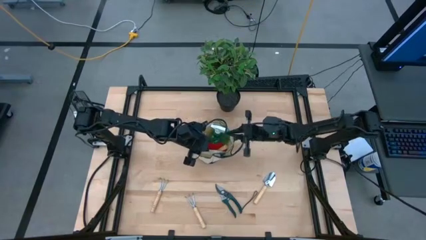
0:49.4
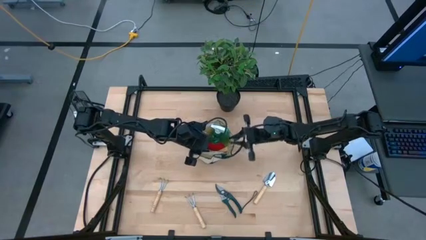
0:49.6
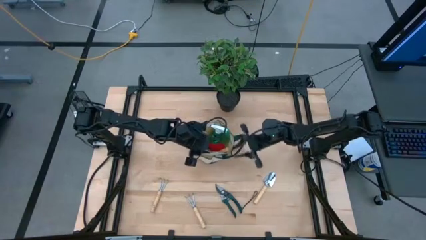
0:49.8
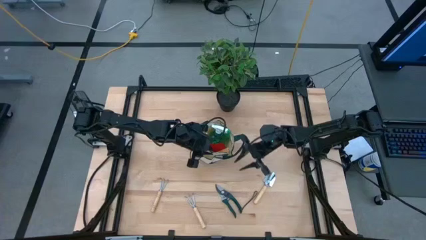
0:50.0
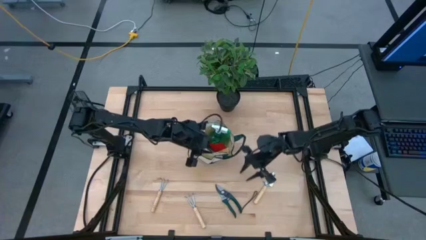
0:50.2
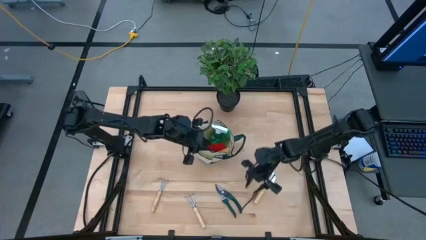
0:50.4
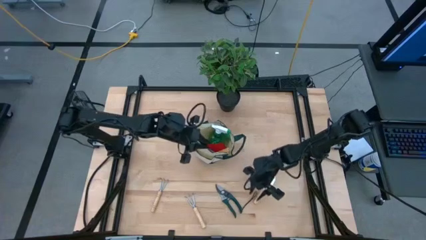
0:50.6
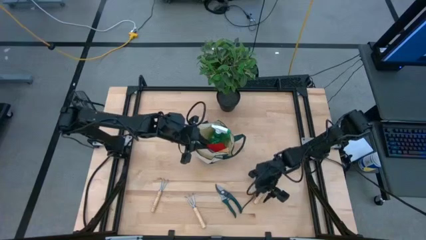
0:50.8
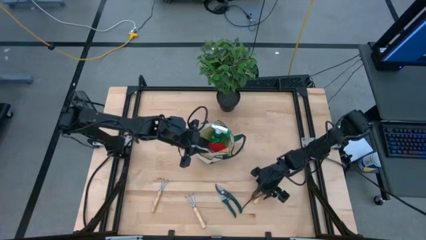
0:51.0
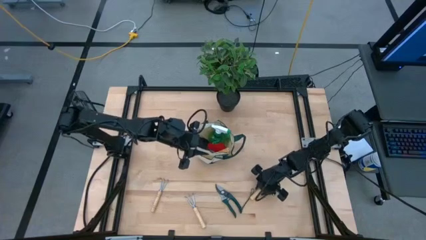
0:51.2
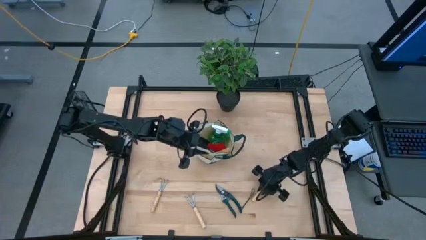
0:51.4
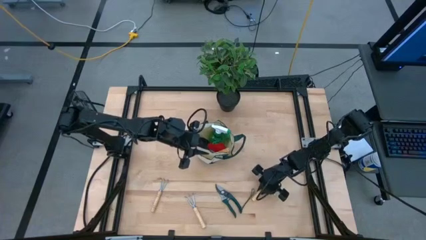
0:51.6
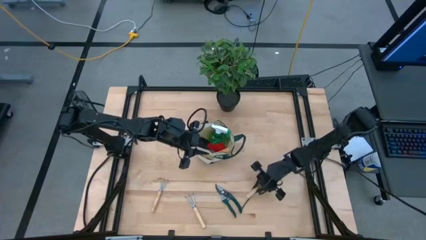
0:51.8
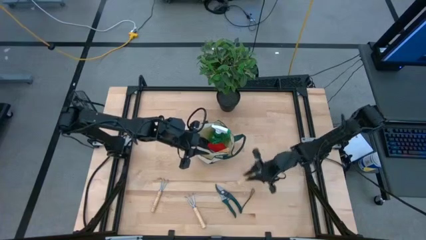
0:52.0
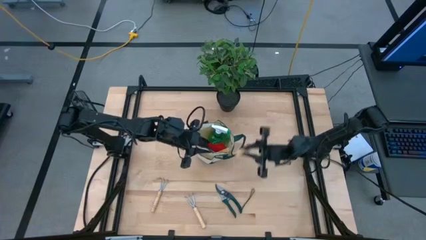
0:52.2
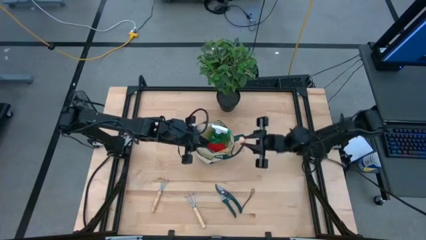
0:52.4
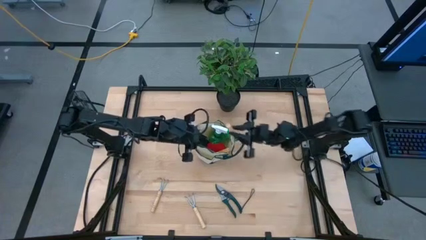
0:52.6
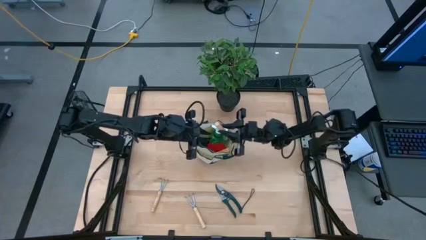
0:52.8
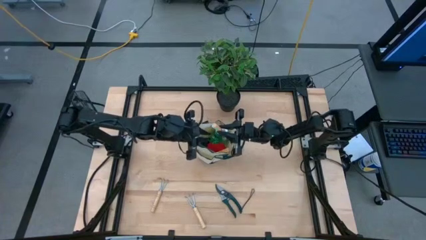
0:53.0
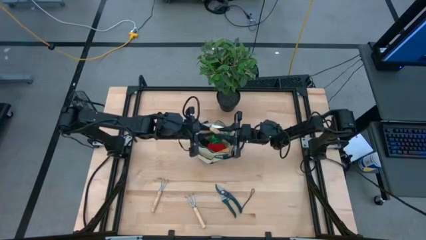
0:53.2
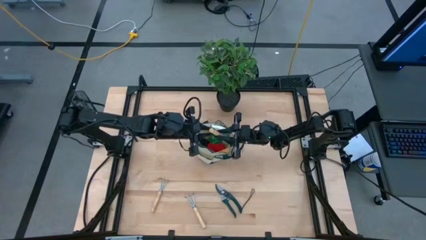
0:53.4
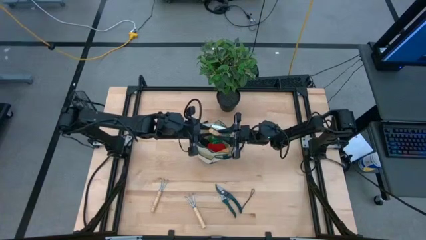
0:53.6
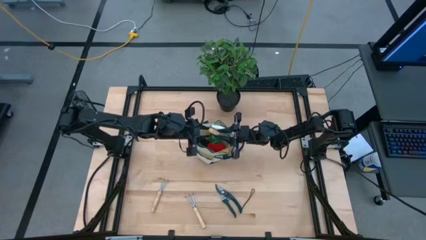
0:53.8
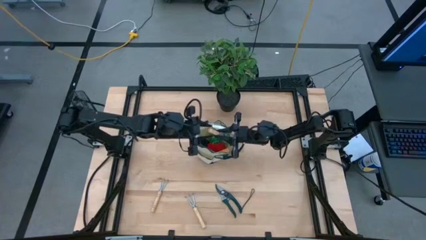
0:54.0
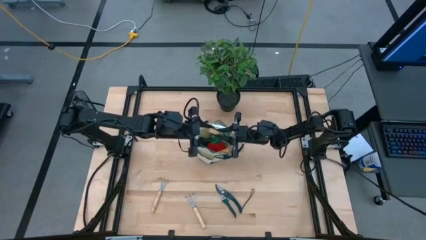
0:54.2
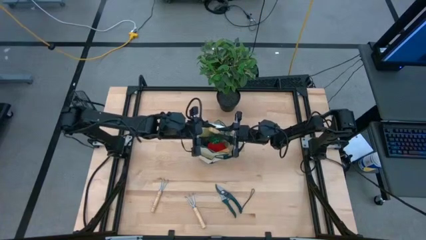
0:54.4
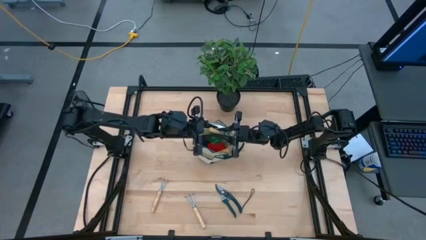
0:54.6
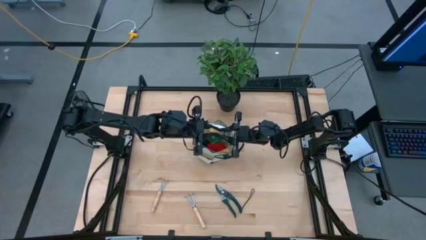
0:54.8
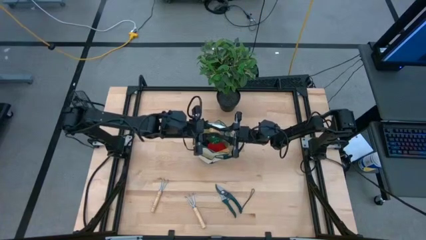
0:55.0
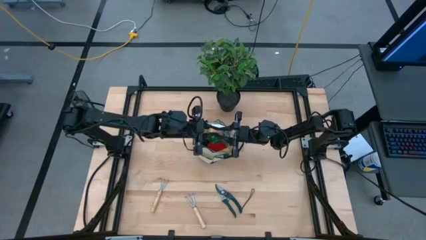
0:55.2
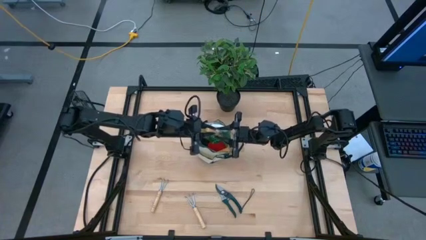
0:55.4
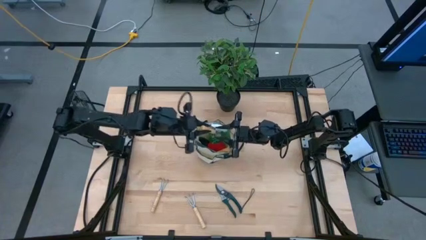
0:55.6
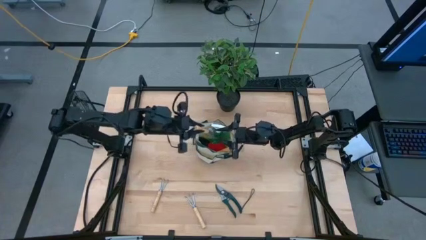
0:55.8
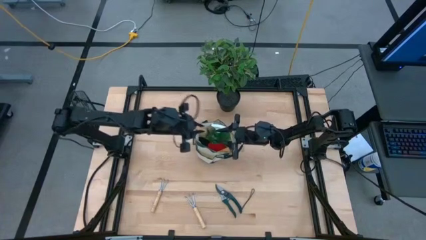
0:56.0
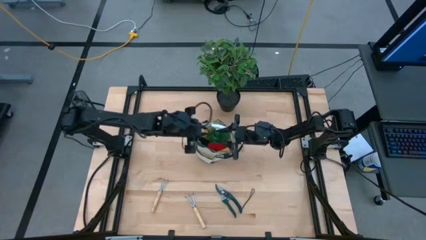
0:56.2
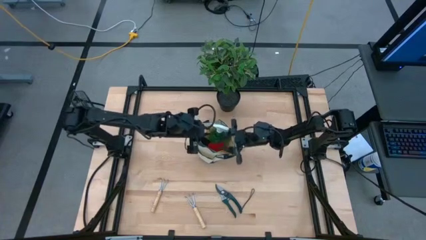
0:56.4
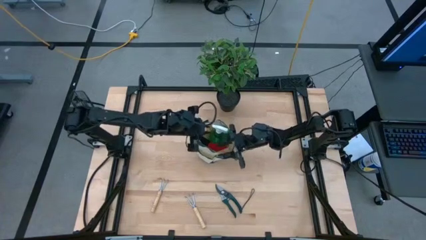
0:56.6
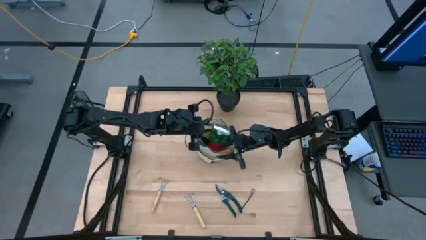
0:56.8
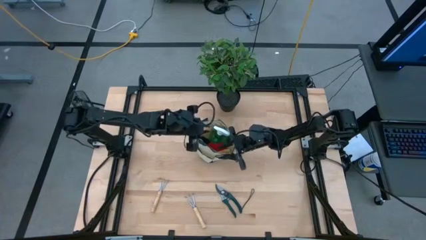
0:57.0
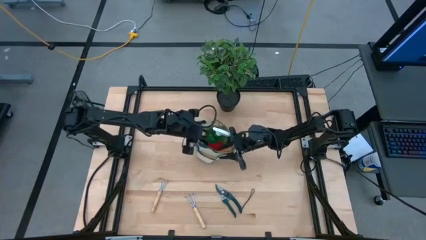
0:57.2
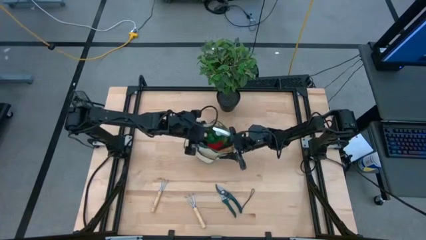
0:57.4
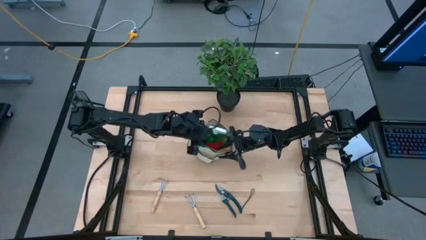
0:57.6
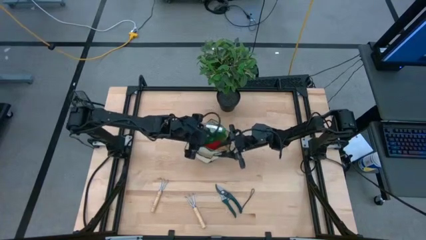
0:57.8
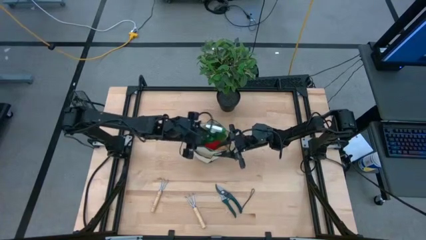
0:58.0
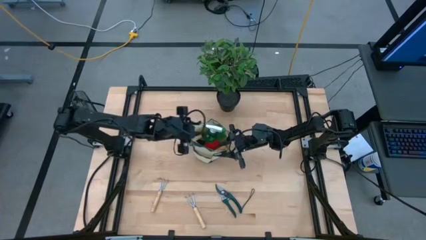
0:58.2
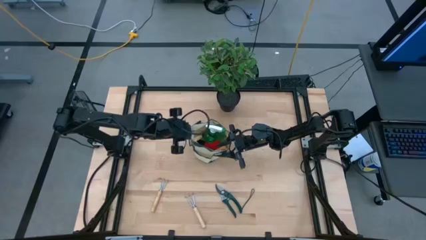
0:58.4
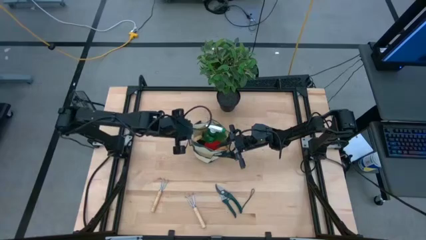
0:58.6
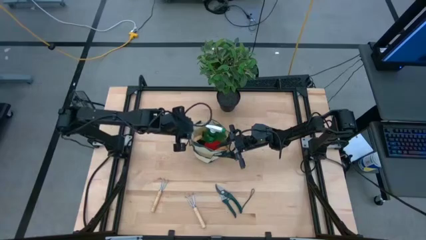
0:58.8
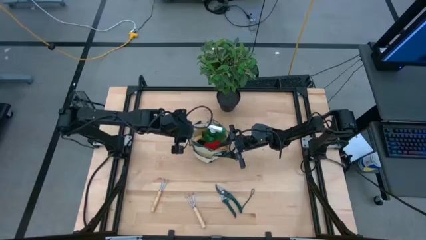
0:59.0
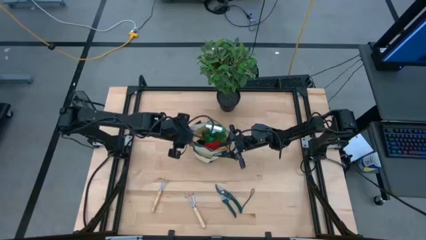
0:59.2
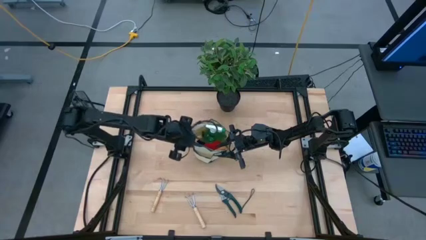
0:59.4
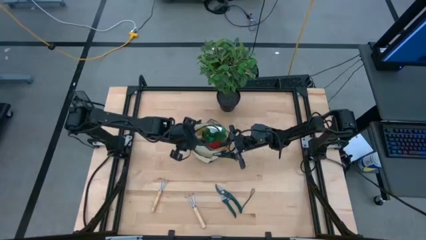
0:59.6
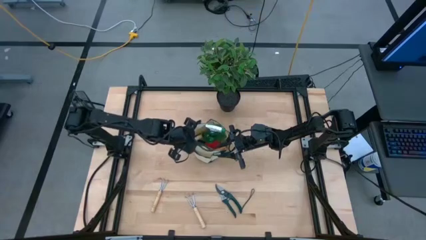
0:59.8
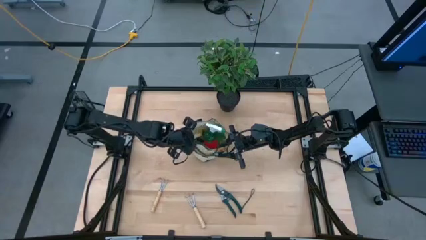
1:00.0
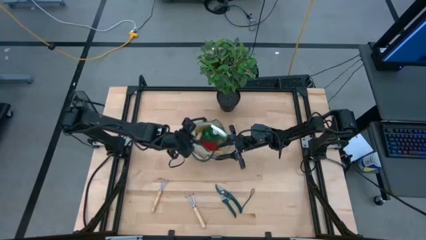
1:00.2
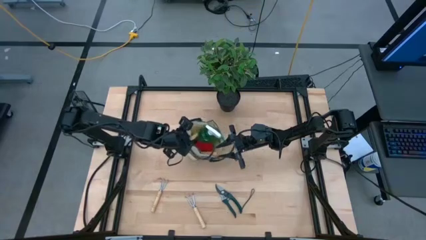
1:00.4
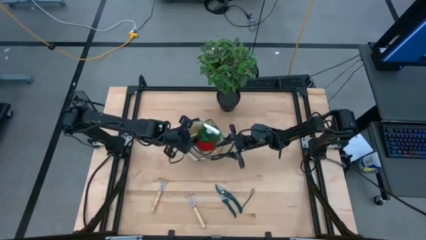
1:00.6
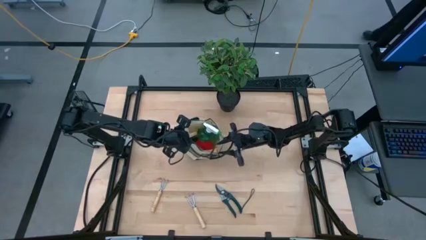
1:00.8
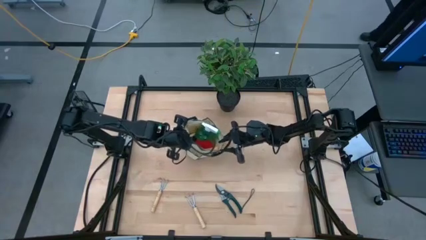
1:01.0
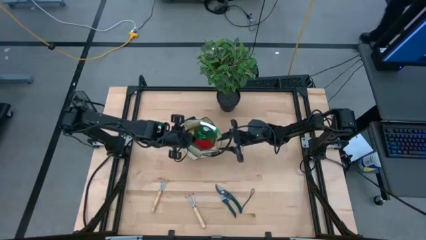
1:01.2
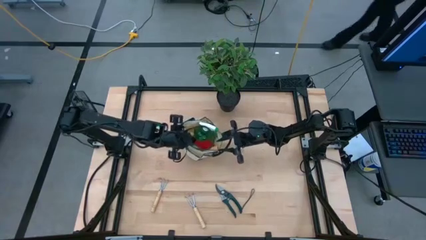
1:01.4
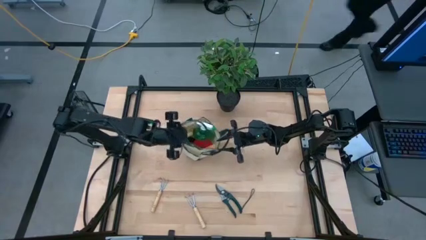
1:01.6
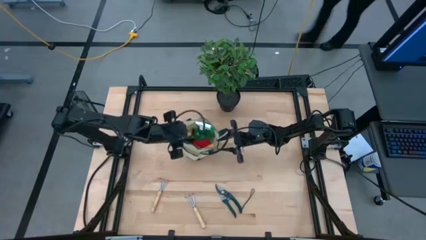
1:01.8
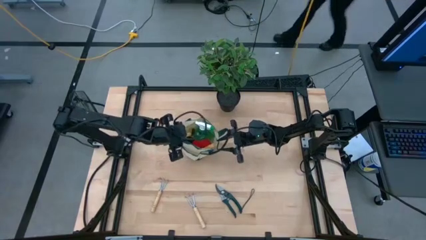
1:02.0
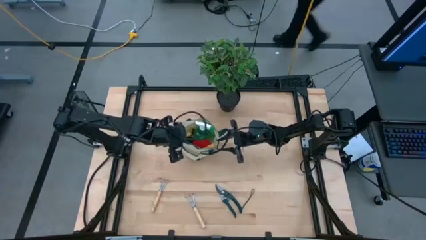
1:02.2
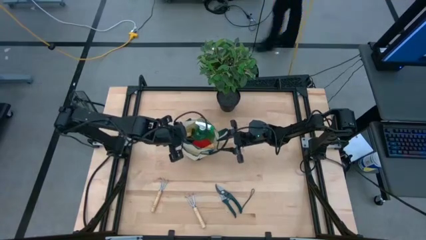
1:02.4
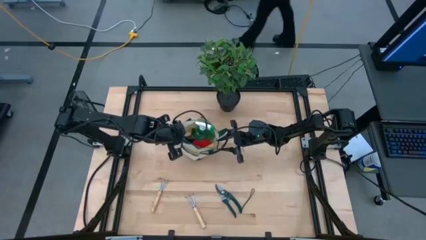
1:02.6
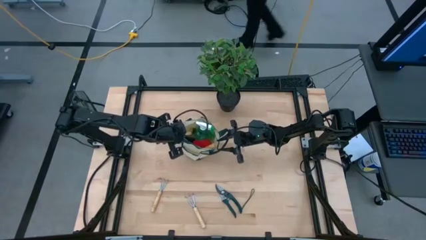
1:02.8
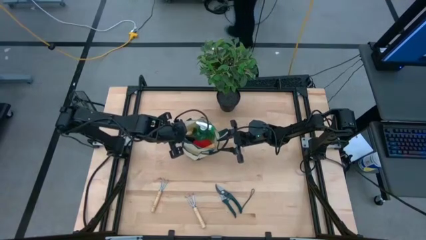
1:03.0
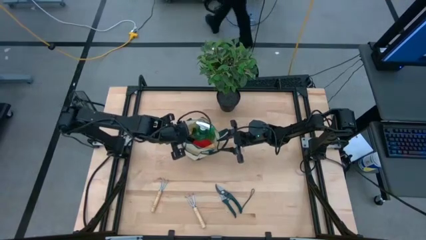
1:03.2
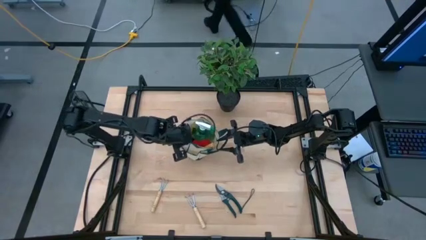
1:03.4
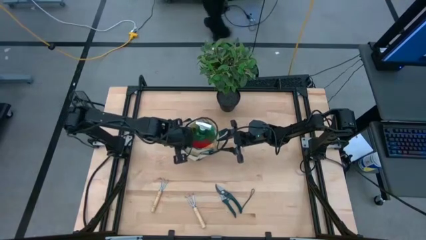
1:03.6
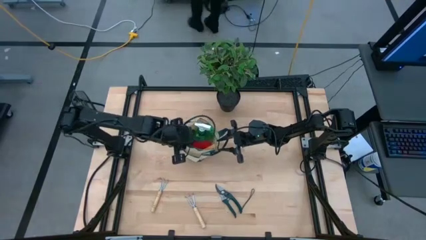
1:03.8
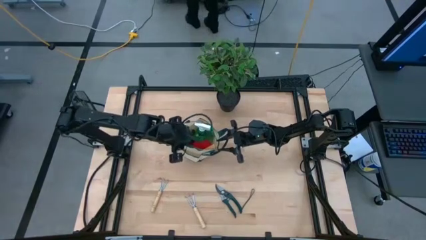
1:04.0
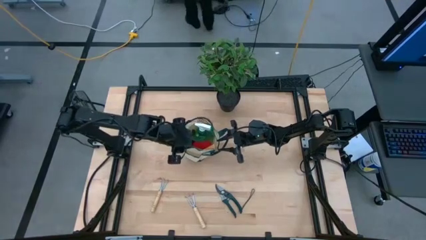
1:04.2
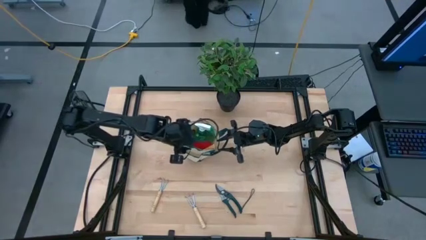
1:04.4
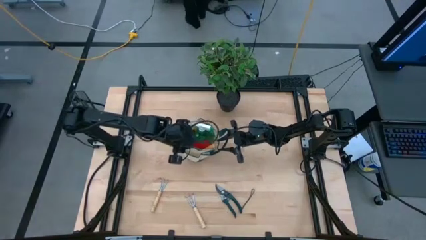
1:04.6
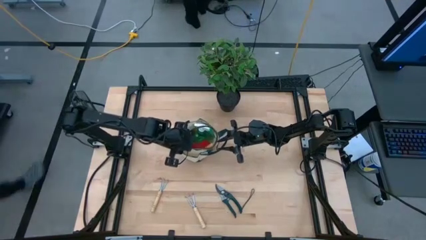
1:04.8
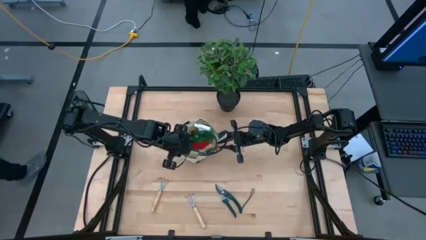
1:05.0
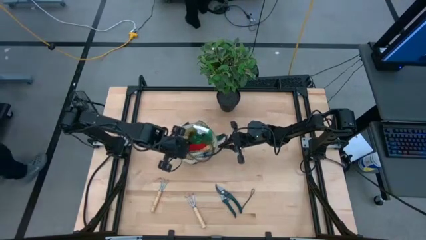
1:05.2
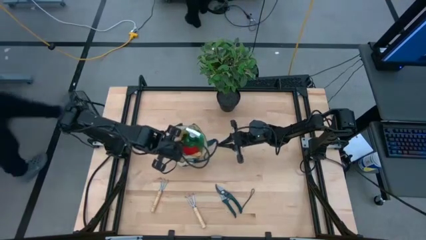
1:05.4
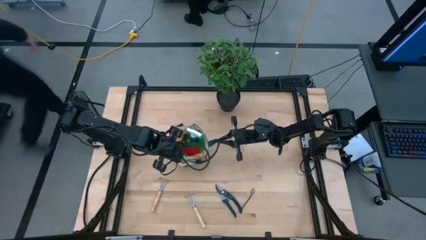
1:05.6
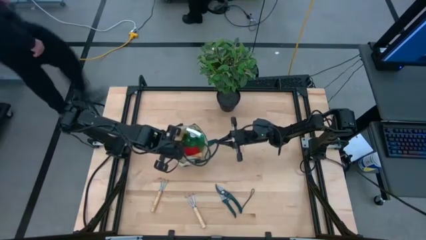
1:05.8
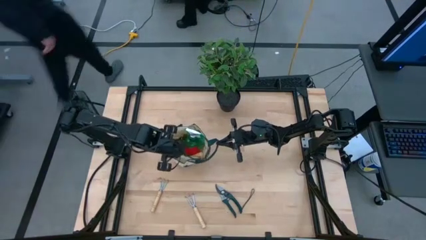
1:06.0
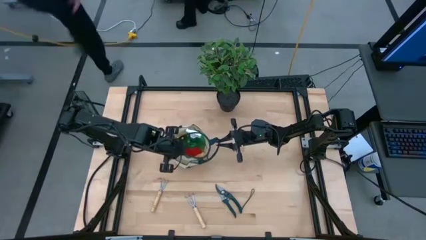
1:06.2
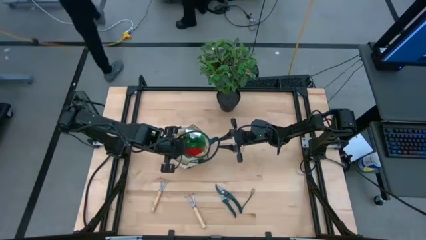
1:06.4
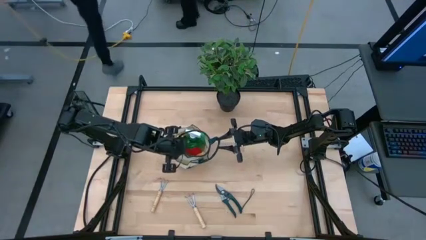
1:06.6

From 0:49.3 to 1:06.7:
Task: Pick & Place Garden tools in Gardening bag
Put the hand trowel in the gardening bag
